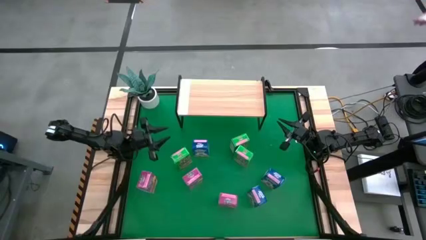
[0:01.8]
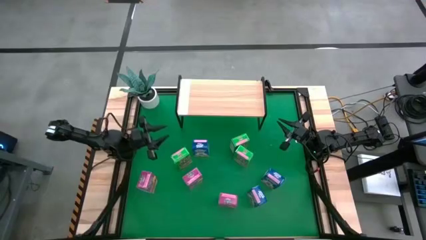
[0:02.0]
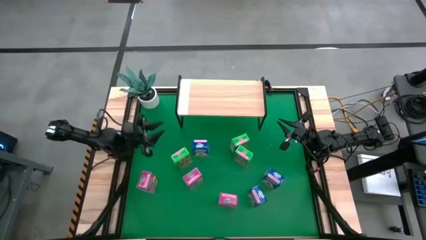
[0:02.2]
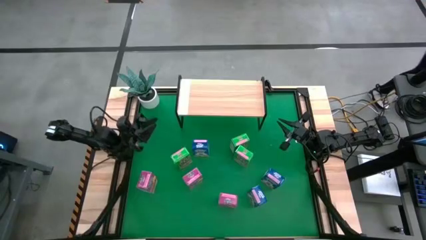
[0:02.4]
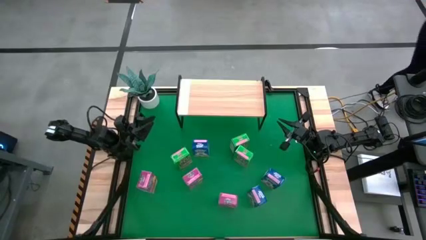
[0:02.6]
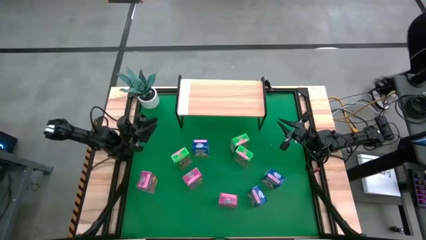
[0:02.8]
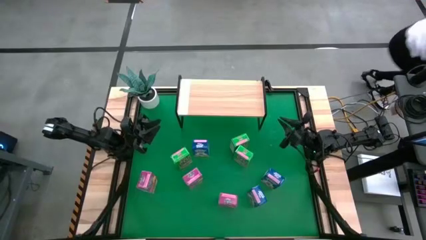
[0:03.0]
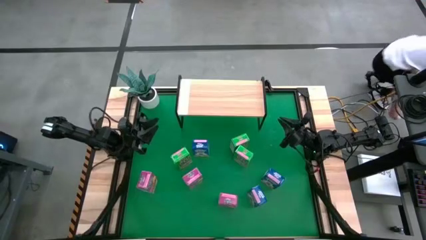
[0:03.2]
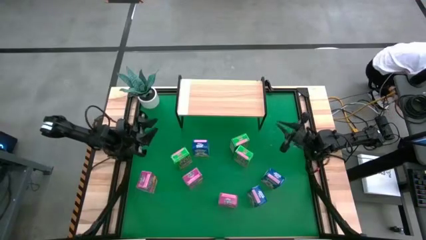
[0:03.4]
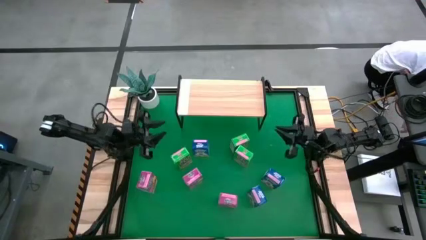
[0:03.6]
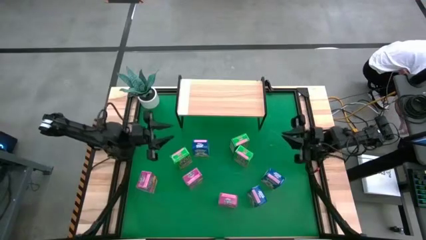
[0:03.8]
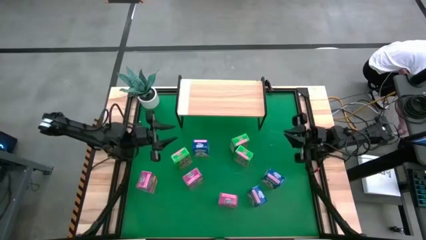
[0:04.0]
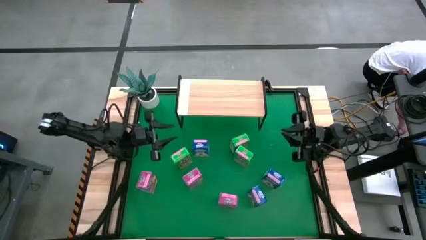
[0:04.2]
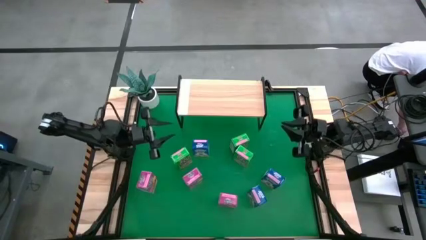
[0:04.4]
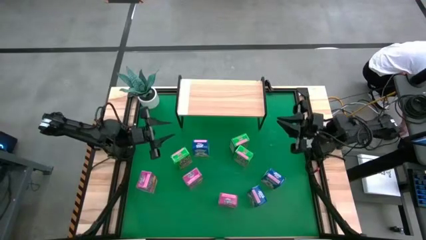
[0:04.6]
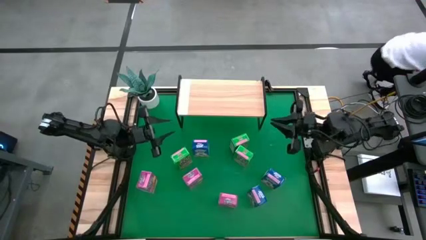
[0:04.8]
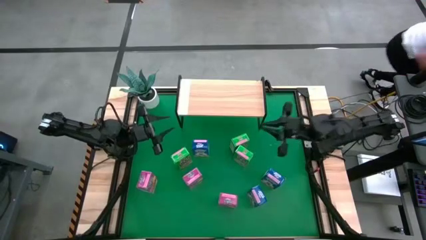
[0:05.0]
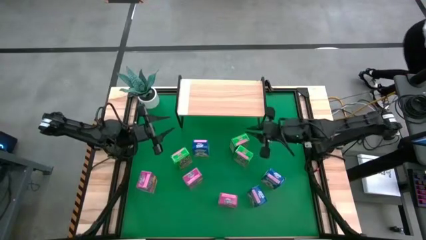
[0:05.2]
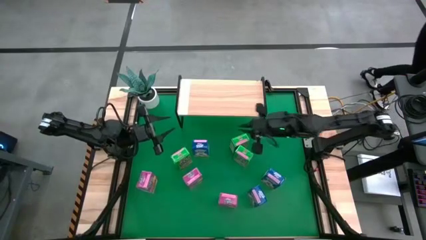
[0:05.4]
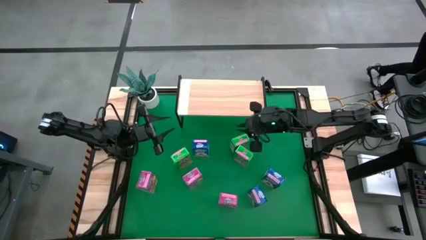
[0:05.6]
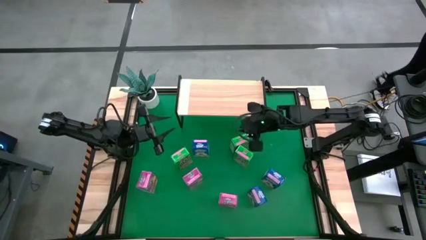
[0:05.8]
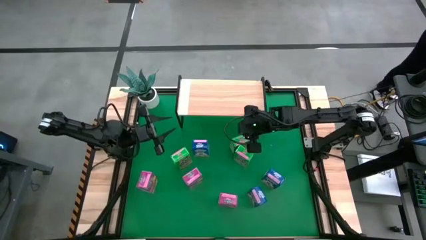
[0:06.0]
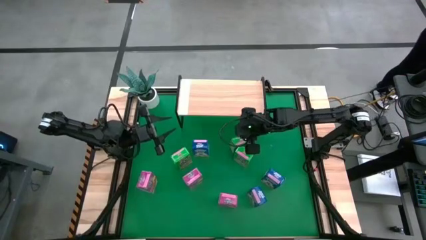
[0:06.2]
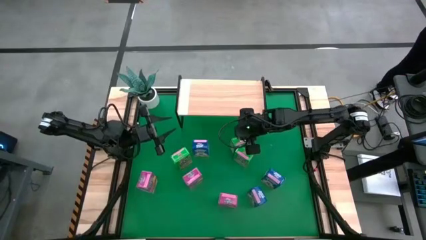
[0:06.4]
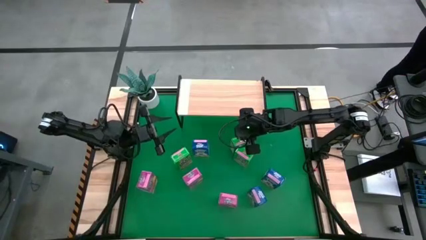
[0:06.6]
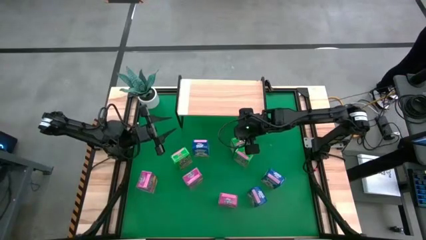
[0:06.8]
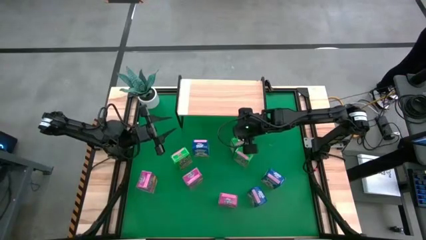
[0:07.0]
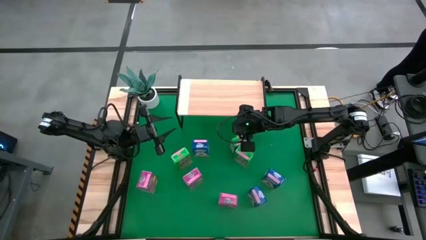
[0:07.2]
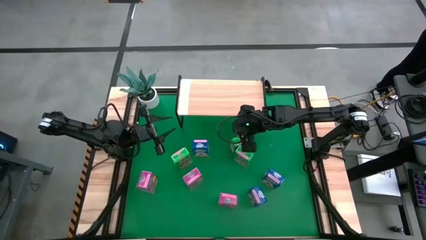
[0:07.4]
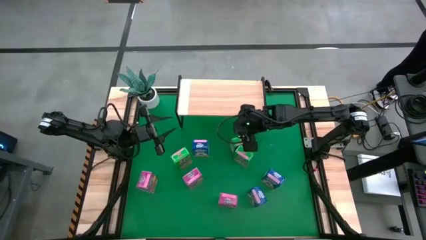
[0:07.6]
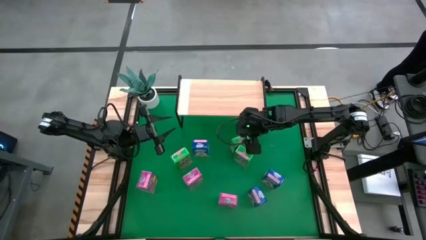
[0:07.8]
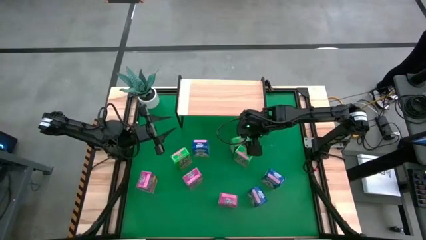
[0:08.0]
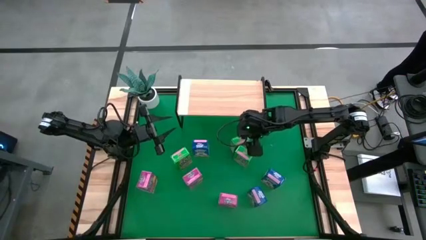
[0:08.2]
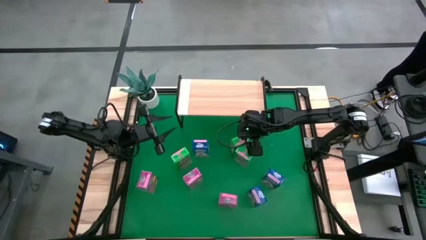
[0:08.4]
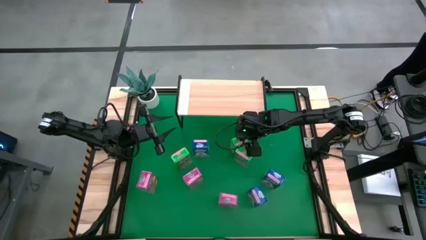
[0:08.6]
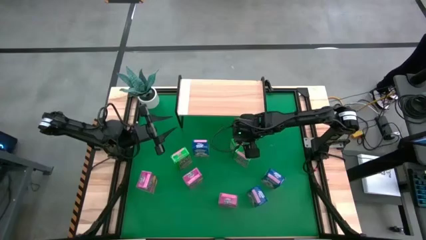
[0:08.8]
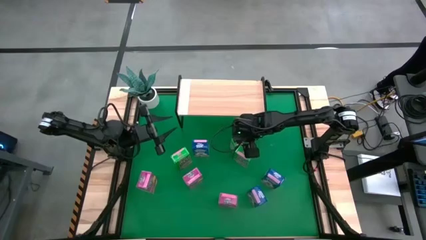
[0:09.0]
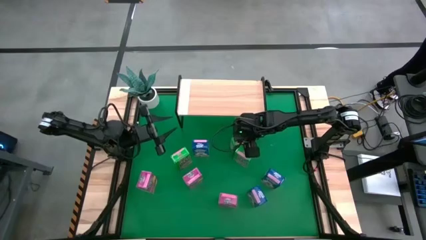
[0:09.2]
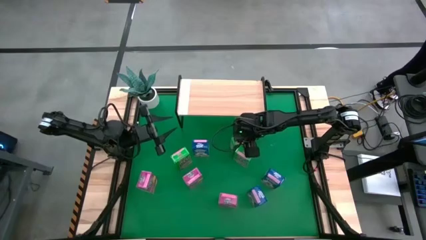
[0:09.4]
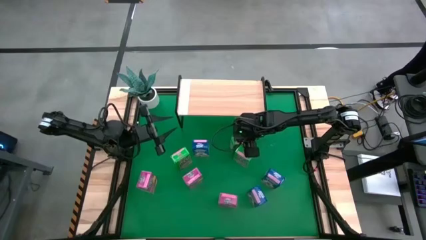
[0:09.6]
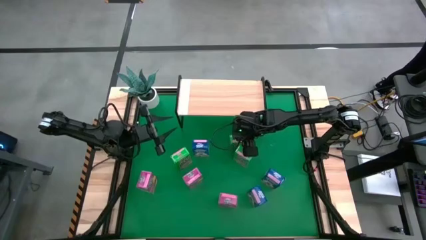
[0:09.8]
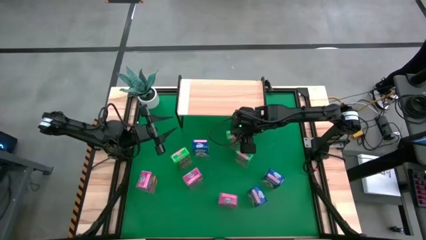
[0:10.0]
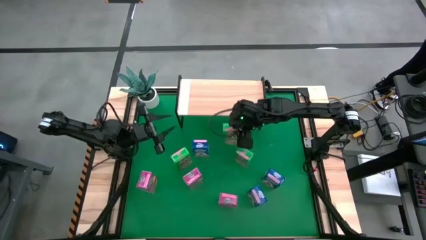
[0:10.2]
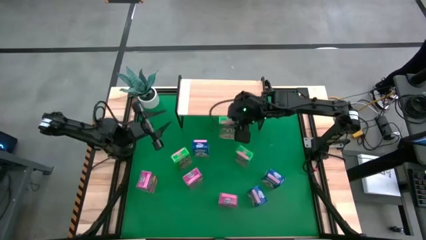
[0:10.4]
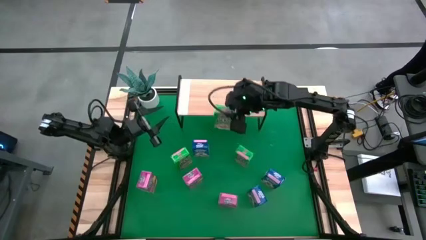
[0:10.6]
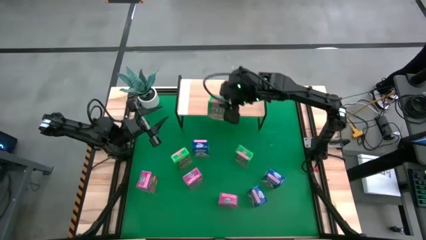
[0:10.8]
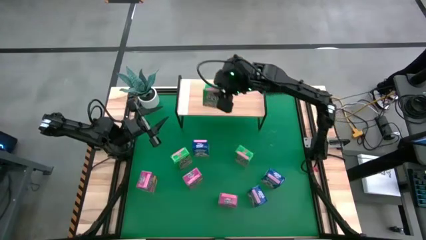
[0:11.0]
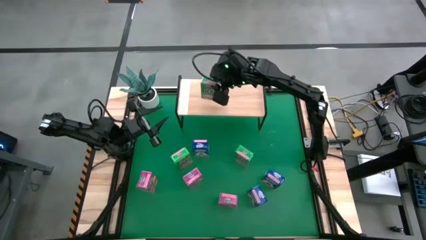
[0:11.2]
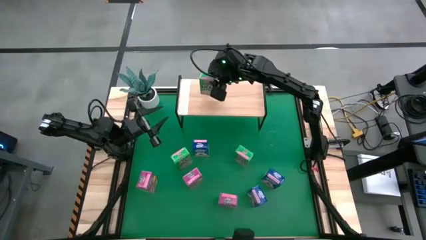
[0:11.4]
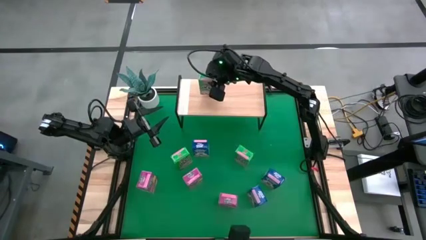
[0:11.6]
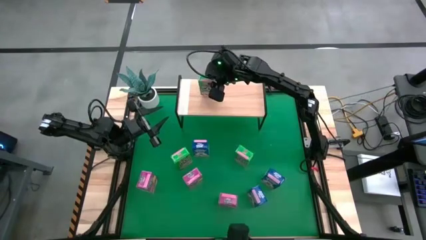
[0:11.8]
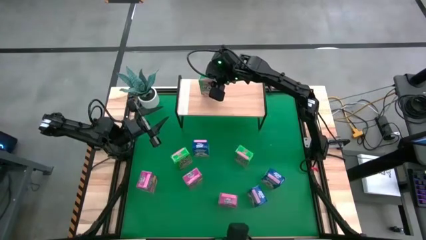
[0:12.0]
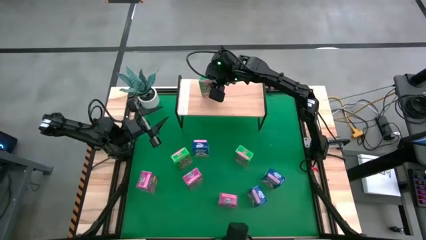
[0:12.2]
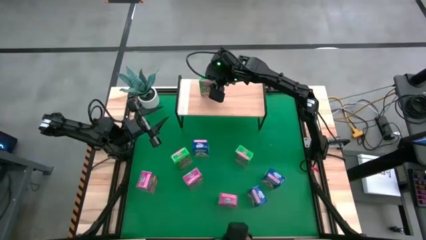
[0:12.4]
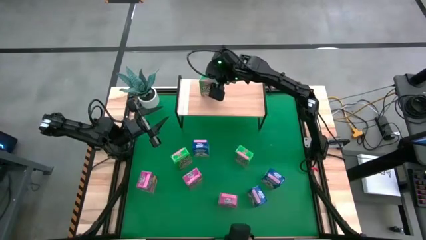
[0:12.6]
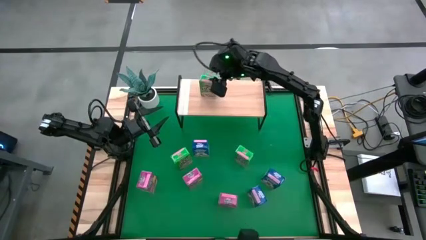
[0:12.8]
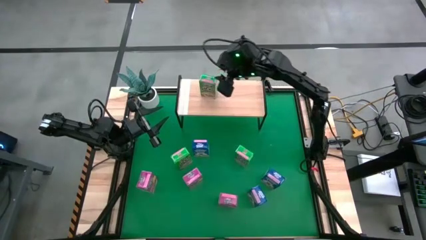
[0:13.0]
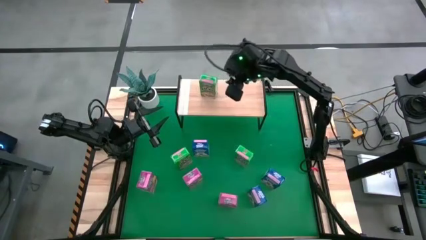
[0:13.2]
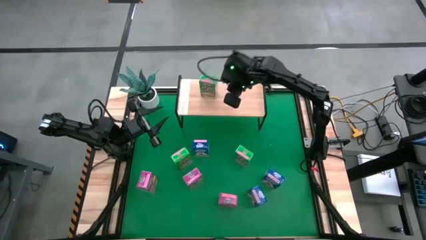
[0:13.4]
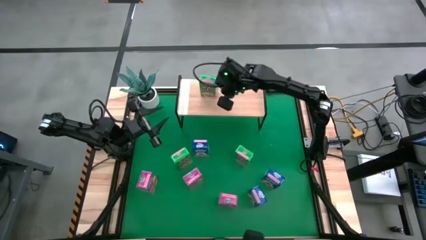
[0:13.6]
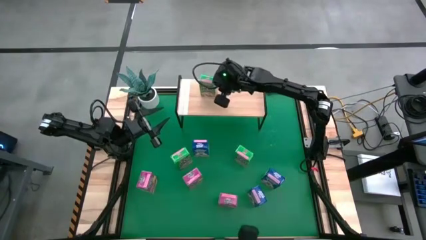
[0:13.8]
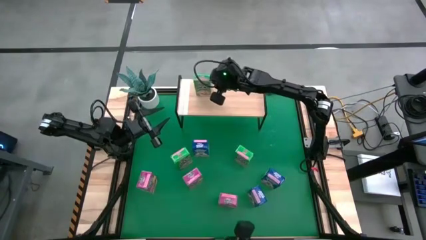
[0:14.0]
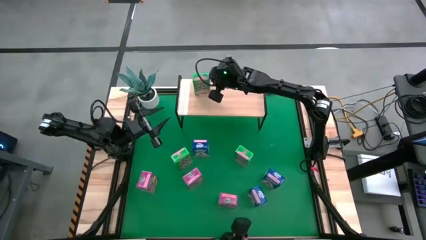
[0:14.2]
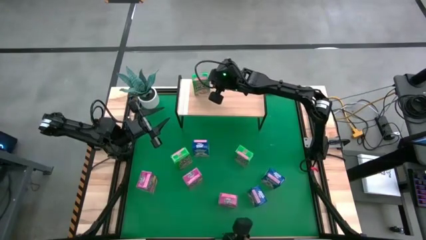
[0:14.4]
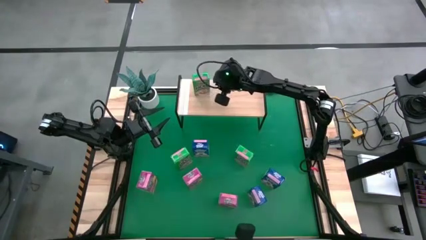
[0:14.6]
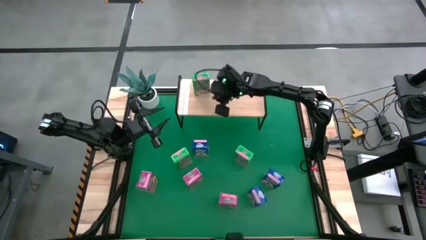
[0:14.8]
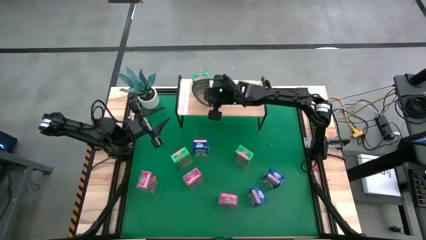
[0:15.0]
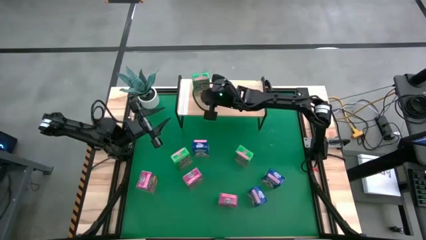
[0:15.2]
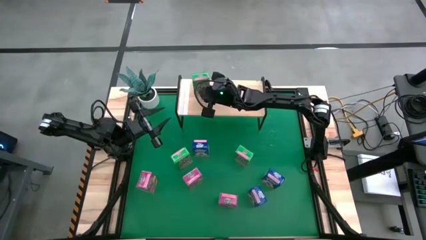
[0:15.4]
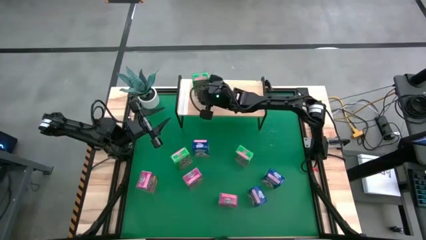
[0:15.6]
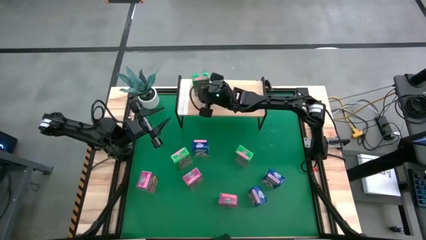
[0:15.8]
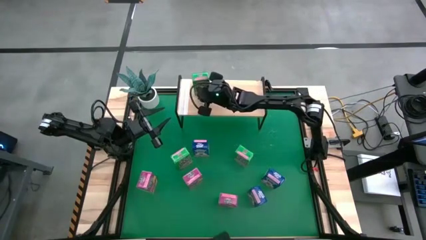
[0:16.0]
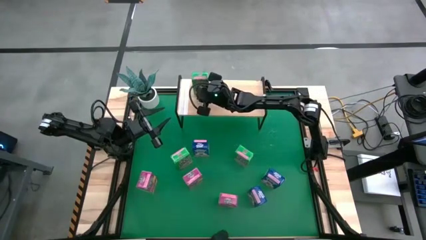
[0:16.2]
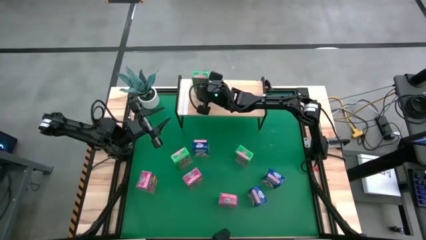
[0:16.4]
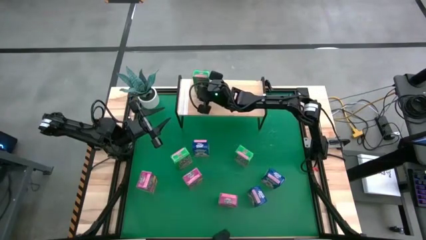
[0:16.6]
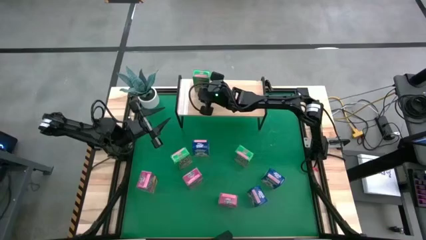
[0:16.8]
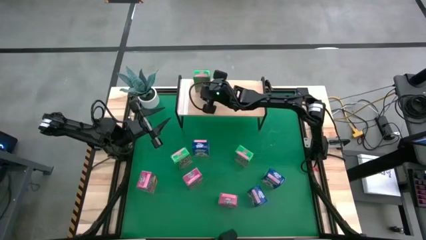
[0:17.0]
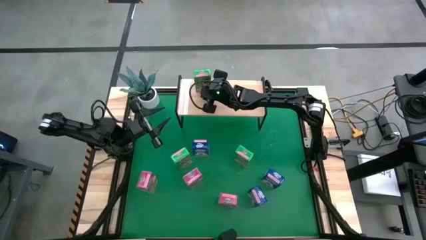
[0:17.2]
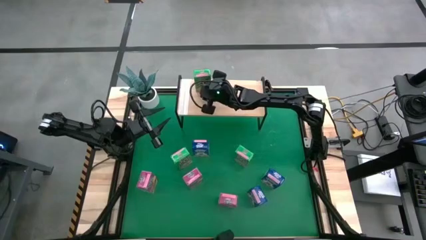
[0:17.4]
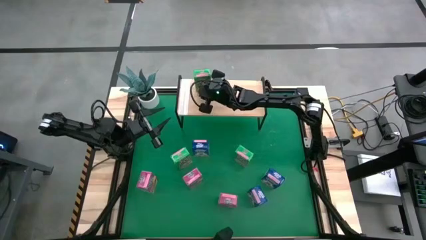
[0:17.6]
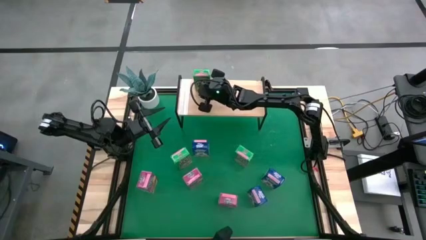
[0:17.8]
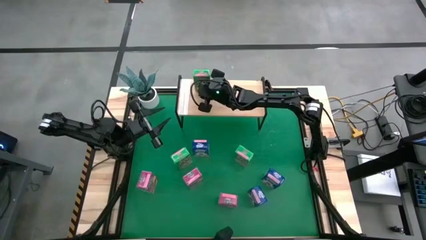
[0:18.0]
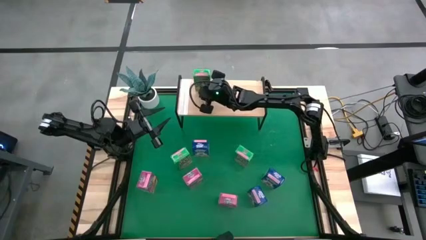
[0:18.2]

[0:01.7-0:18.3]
Task: Stack cereal on shelf
Put the top green cereal box on the shelf
